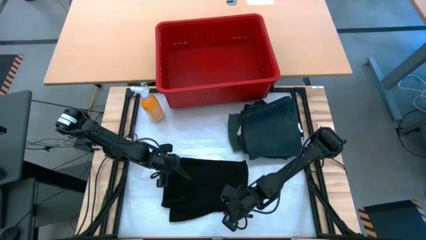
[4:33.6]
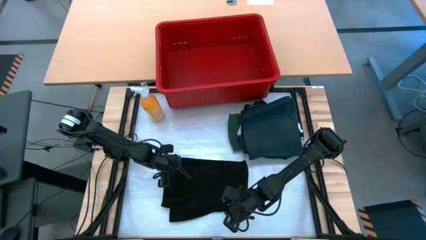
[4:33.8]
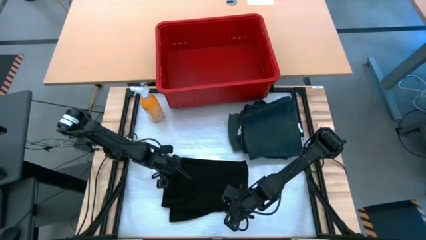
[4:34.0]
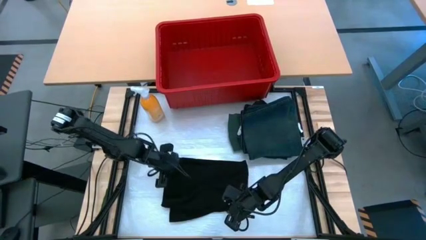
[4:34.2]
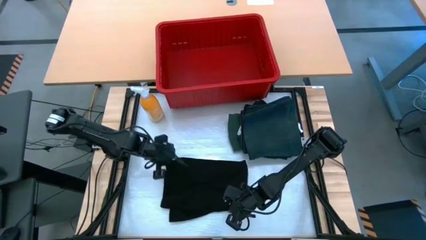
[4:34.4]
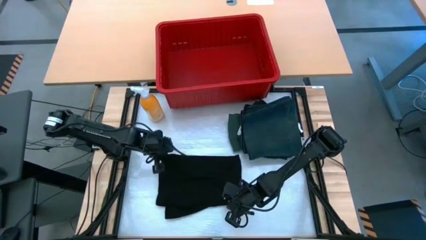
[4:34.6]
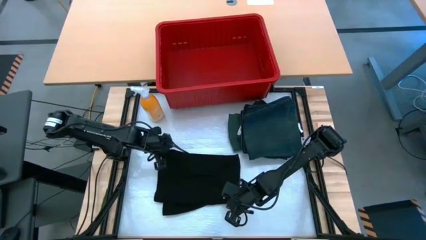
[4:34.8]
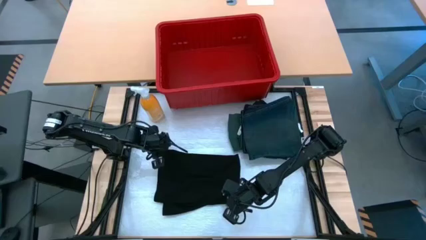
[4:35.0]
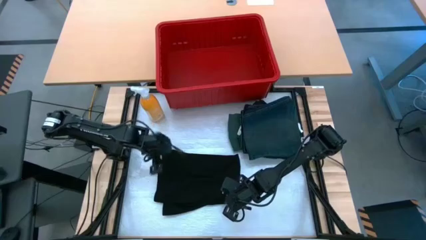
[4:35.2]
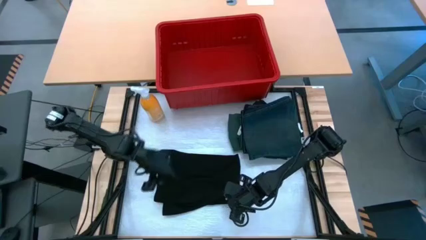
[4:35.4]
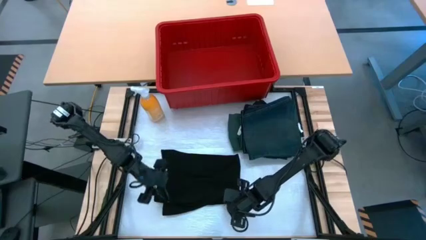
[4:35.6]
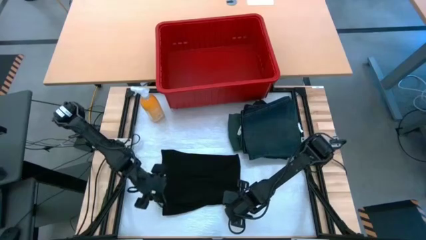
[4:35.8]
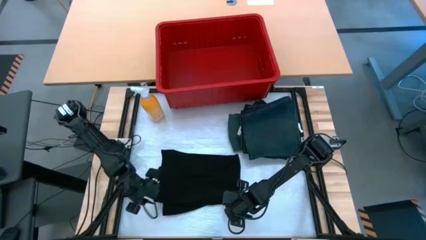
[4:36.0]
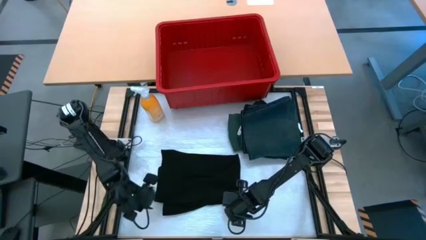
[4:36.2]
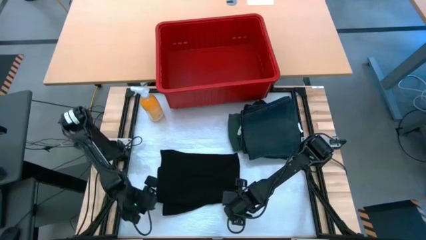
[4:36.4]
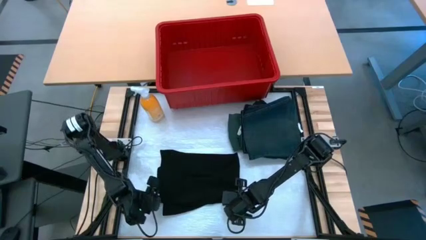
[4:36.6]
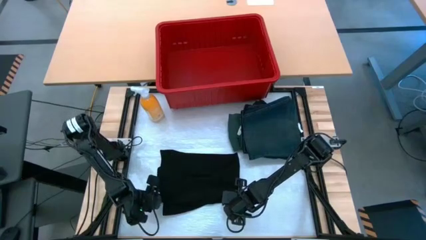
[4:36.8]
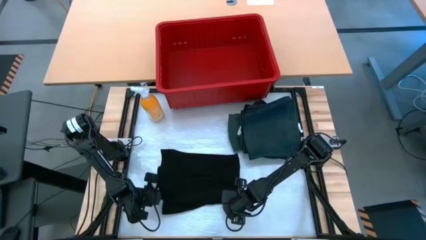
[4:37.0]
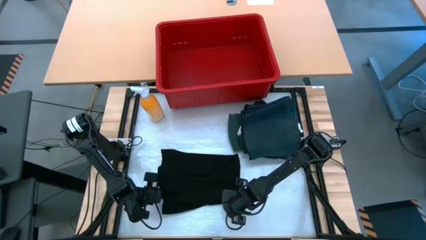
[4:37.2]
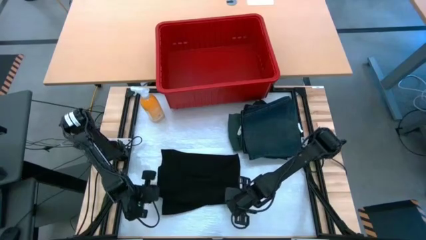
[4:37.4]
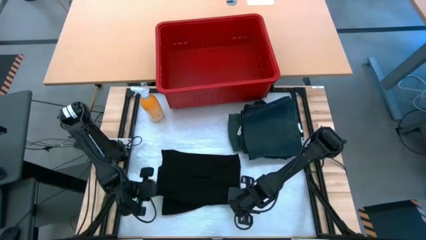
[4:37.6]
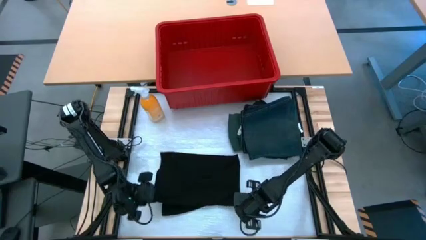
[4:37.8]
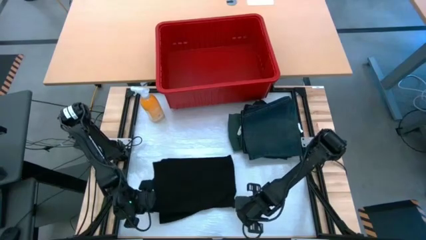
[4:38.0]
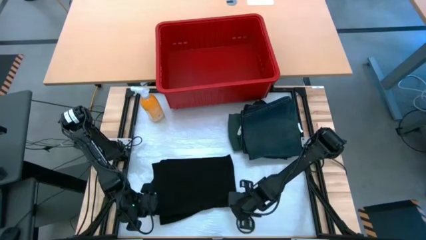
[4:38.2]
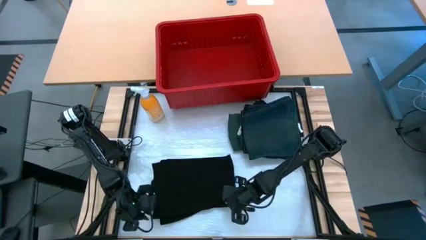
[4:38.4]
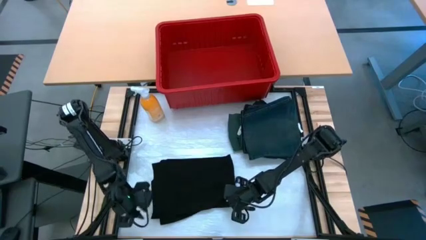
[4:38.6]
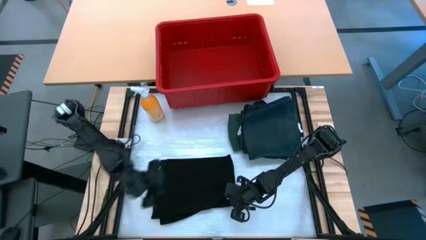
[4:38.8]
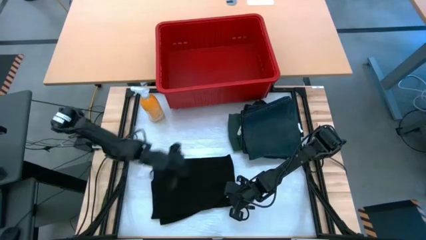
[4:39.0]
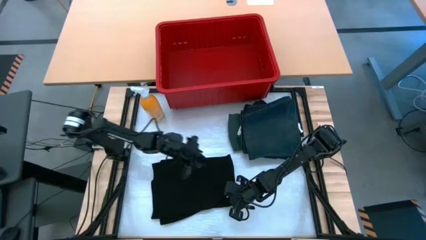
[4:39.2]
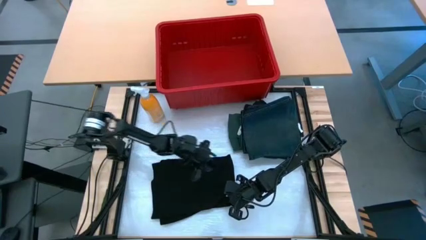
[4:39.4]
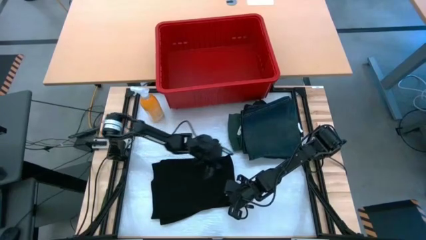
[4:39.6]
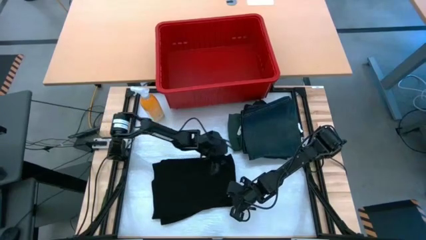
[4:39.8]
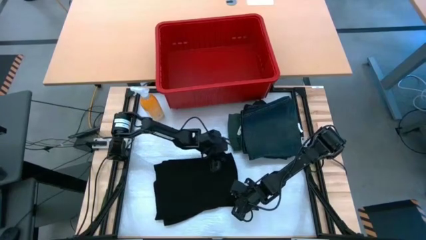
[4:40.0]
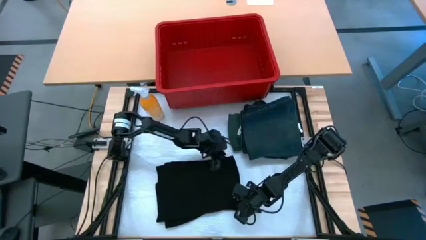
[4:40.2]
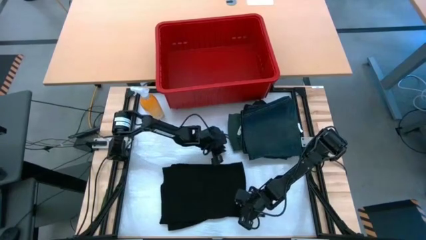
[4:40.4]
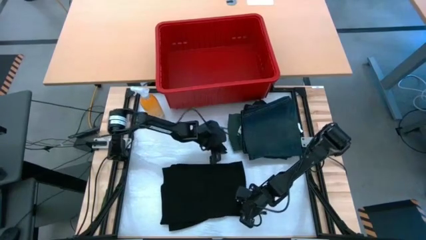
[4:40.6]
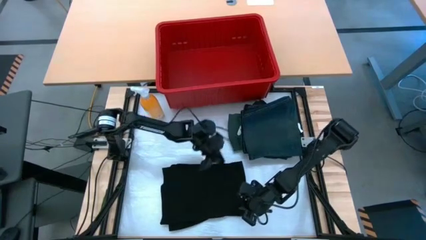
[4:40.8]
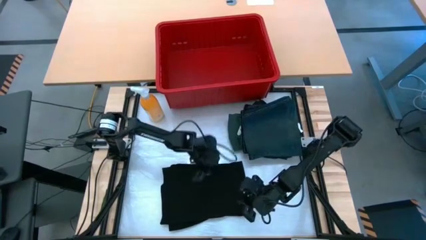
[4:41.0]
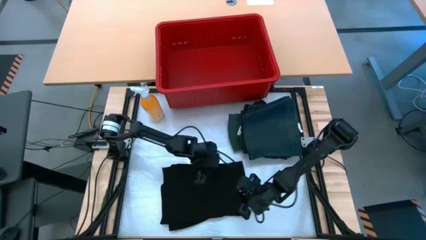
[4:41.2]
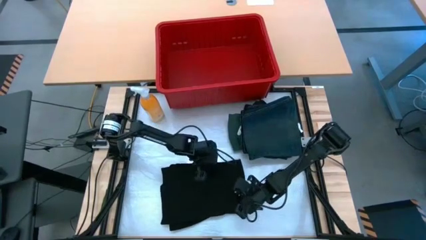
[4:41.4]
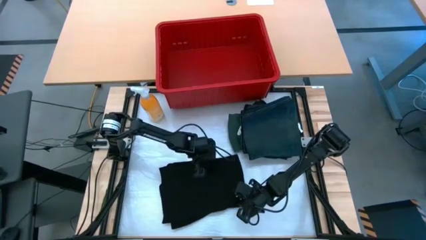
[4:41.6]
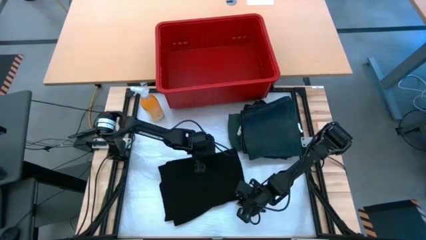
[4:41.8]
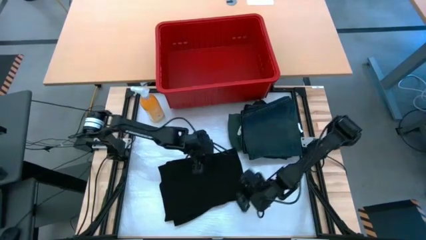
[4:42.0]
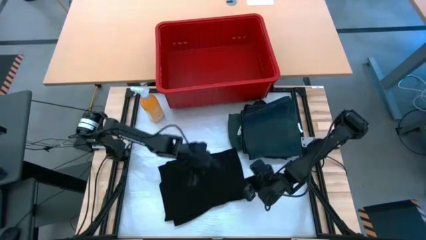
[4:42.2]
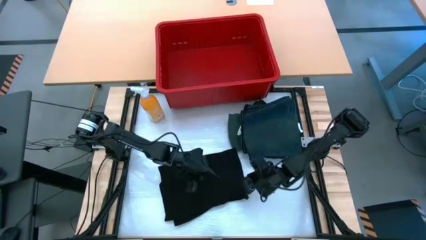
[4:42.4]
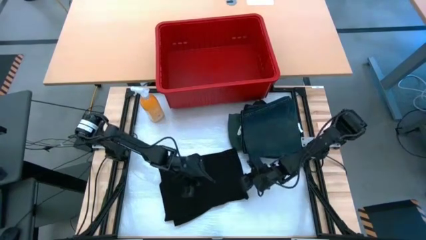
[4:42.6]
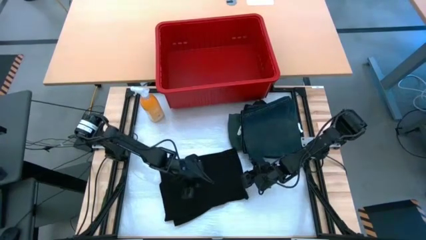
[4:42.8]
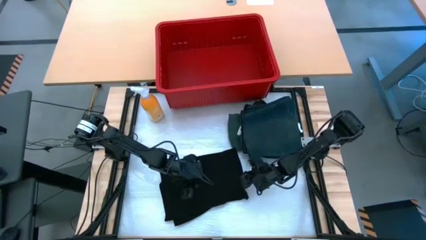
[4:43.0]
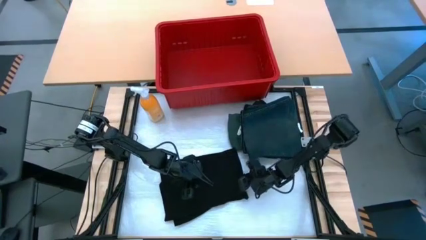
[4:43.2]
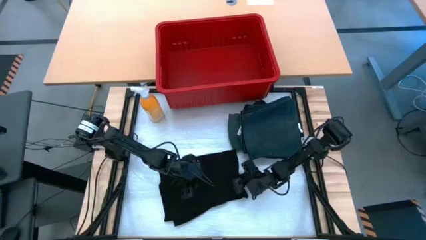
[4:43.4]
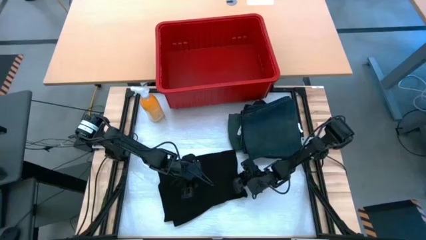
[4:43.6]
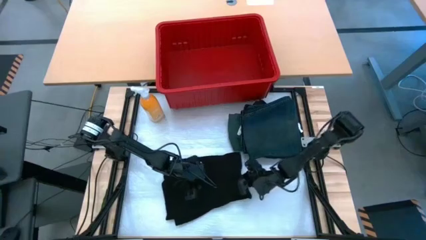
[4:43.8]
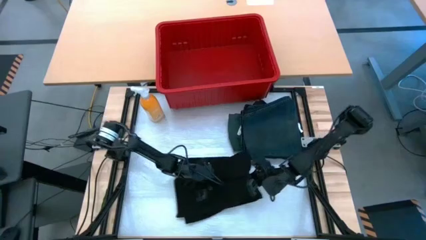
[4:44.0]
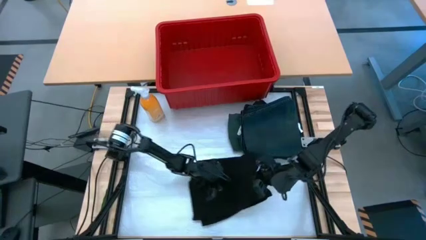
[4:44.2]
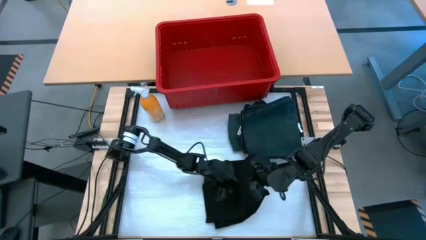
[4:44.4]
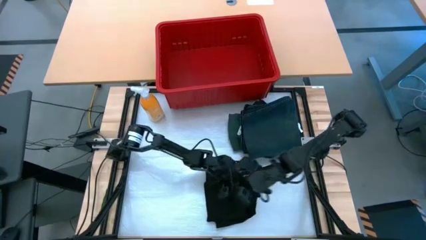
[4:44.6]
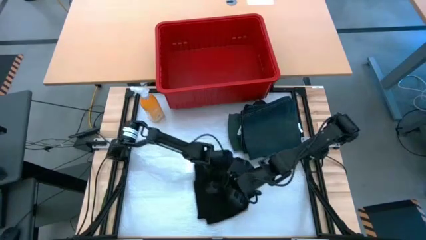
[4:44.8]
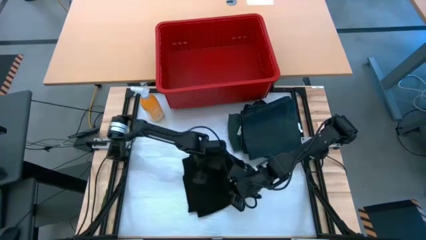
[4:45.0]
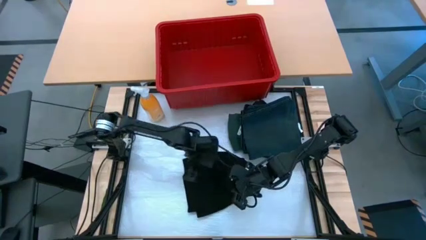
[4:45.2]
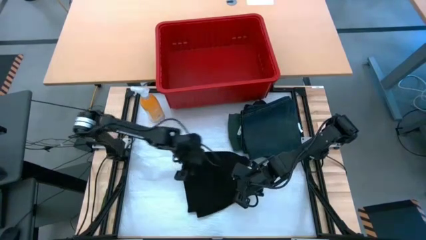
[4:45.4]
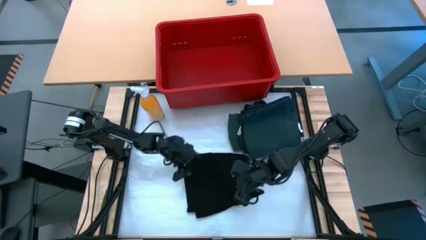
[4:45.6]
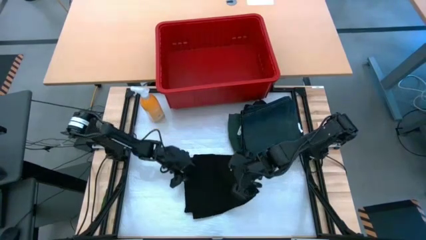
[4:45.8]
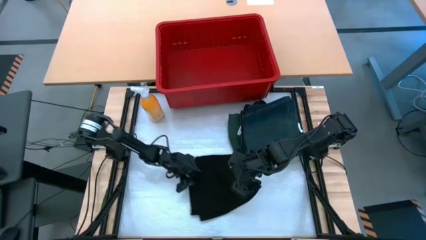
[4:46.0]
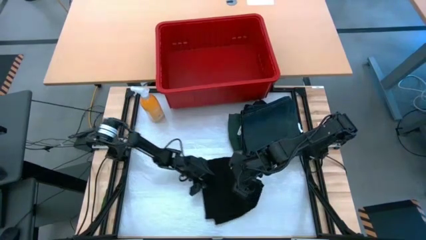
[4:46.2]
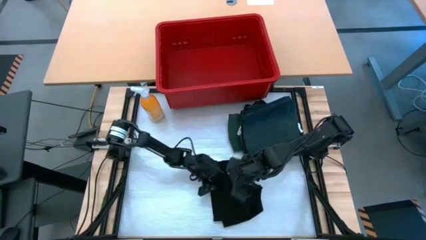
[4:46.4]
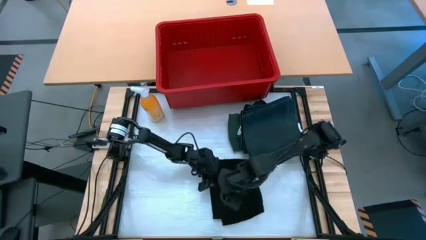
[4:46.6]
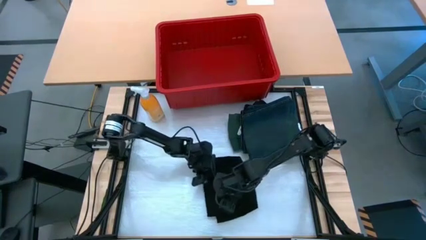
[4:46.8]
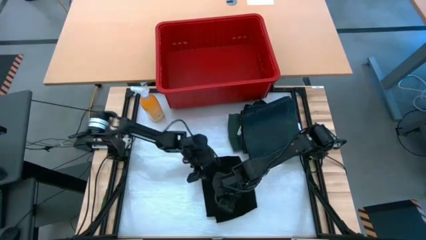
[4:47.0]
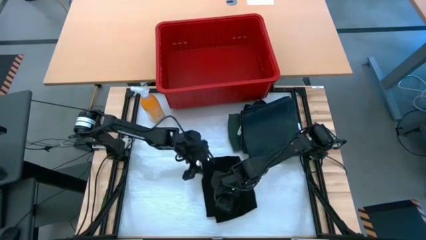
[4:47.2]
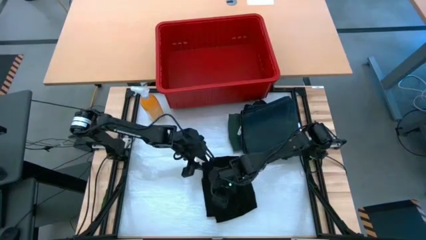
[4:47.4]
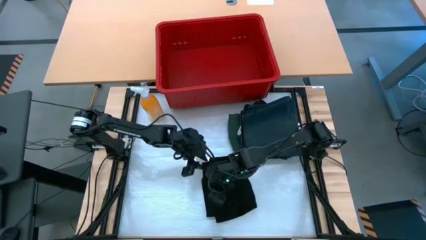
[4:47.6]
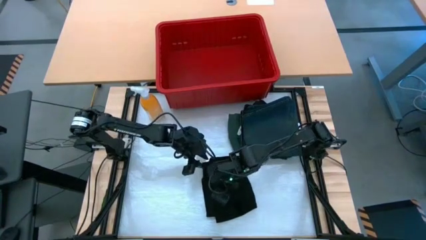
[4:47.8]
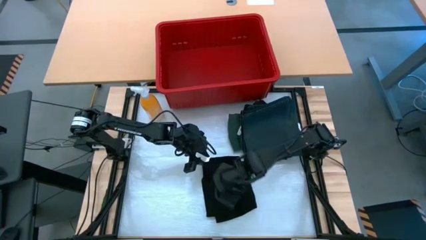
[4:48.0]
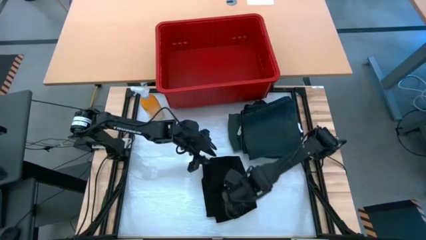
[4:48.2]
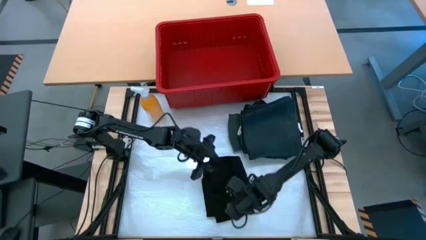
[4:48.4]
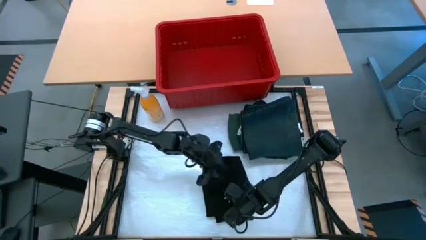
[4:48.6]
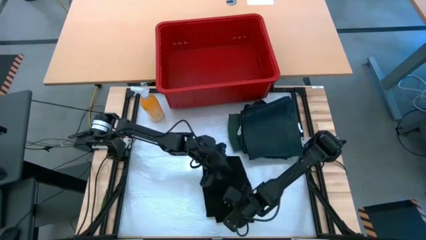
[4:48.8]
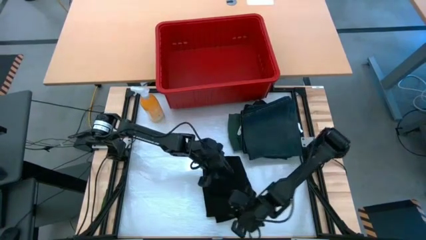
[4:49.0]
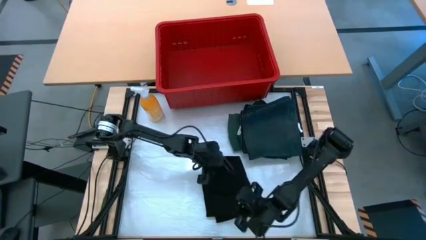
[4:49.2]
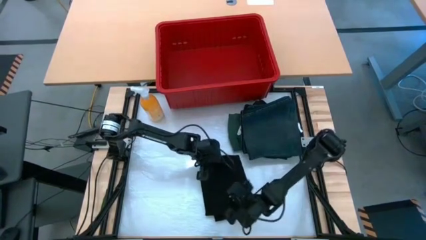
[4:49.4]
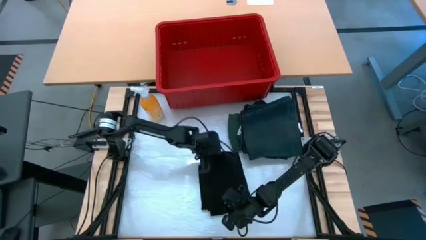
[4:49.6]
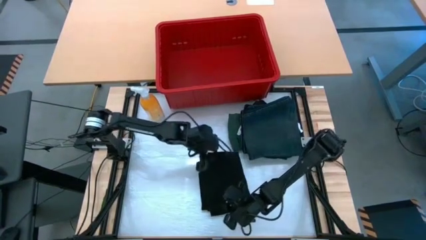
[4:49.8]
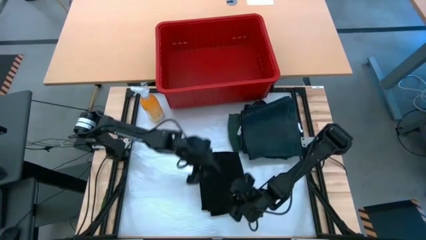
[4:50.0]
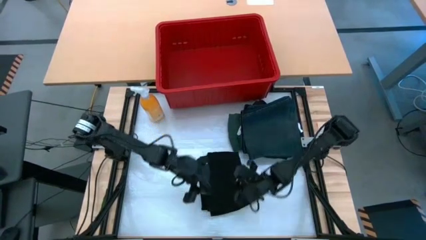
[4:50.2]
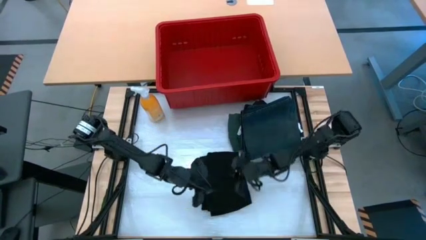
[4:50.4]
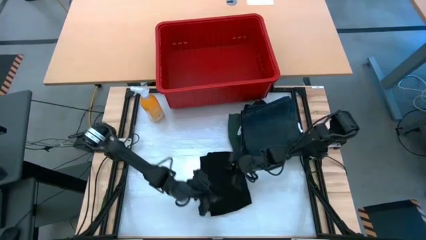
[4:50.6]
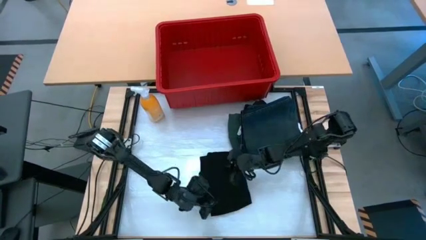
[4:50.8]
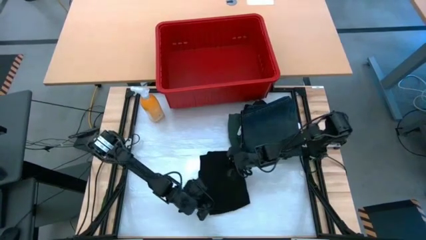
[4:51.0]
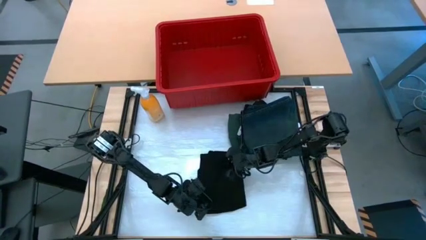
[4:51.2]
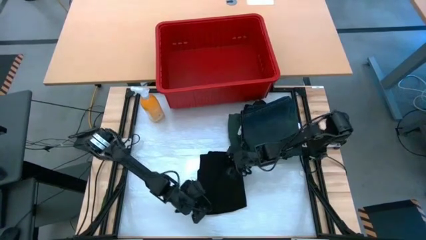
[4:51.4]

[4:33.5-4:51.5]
Task: Fold Laundry from Bin
Fold the black shirt from the red laundry bin
